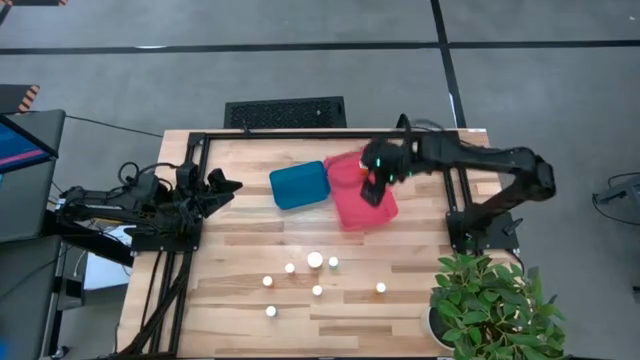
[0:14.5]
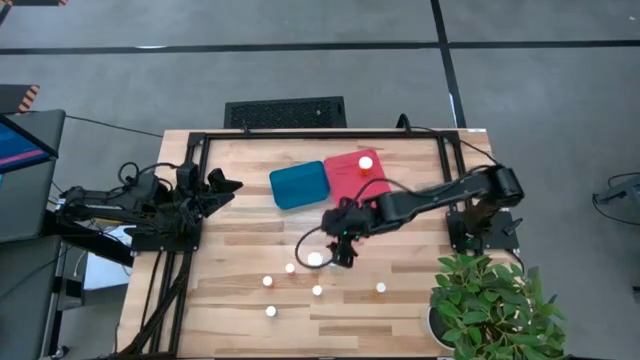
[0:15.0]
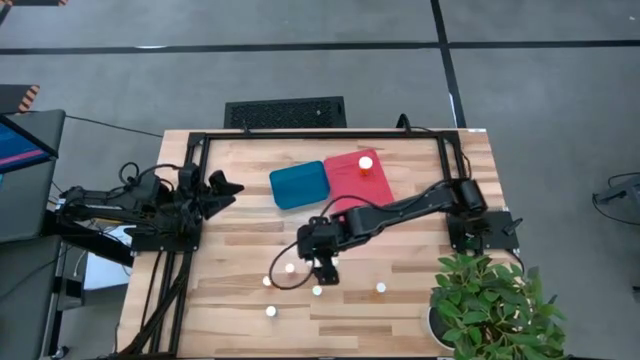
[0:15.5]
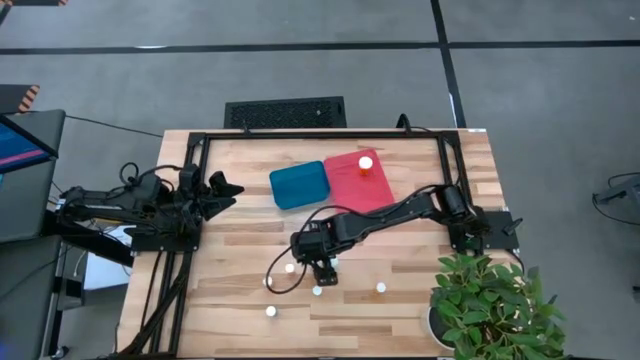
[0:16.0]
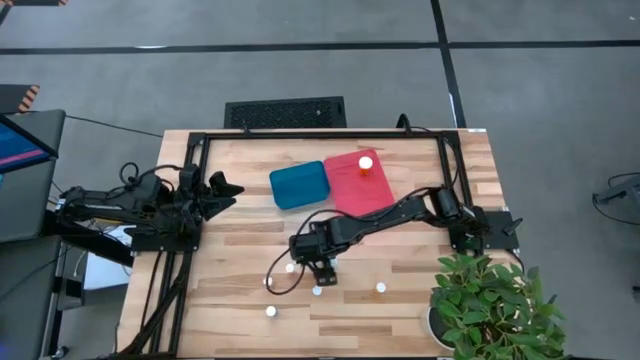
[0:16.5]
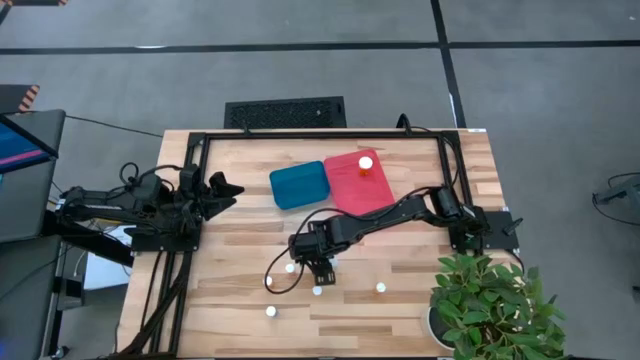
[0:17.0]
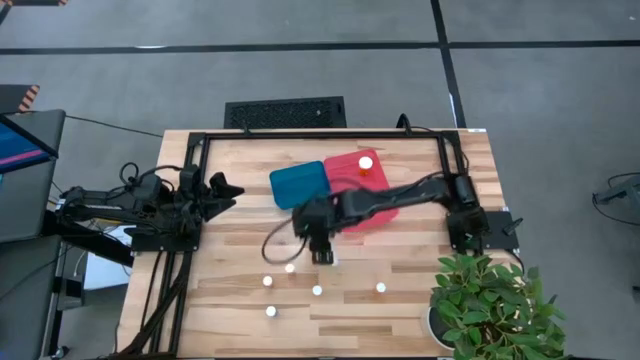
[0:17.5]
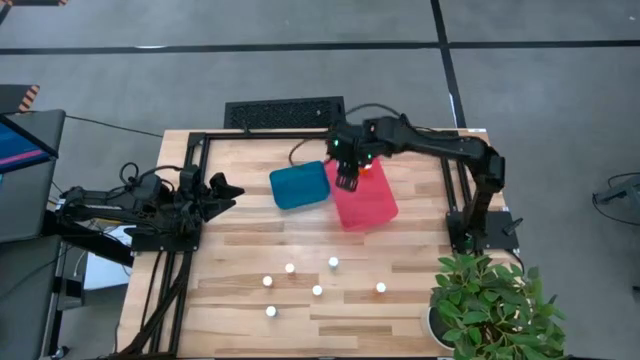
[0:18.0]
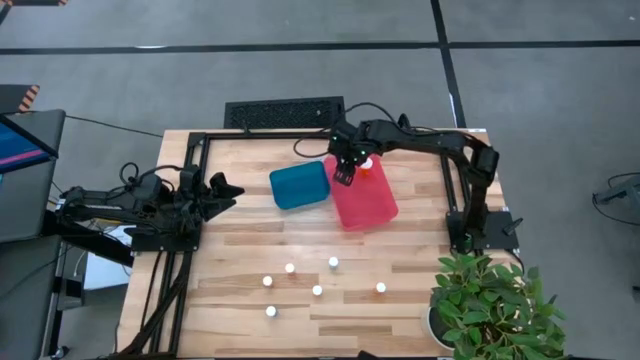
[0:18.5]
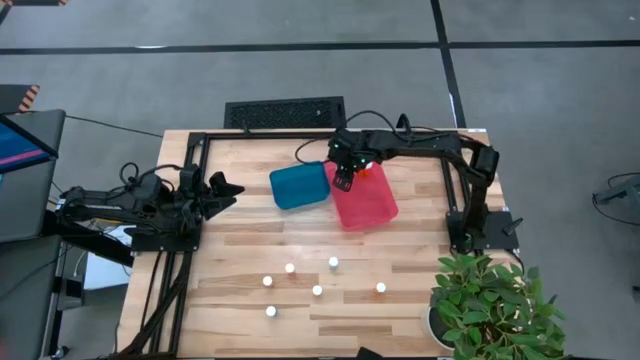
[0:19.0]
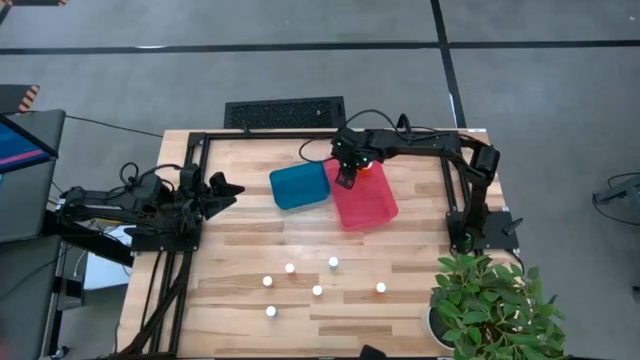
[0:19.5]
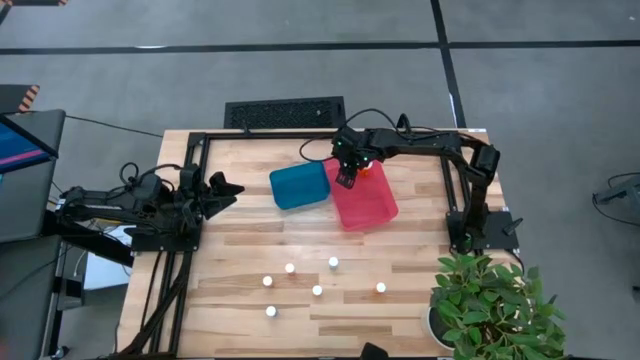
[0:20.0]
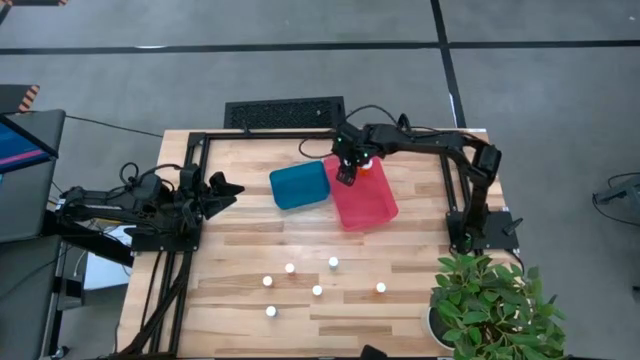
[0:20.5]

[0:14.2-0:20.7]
Task: Pick and place medicine bottles into bin by pill shape (circle, oval)
Put the large orange pill bottle into the red bin

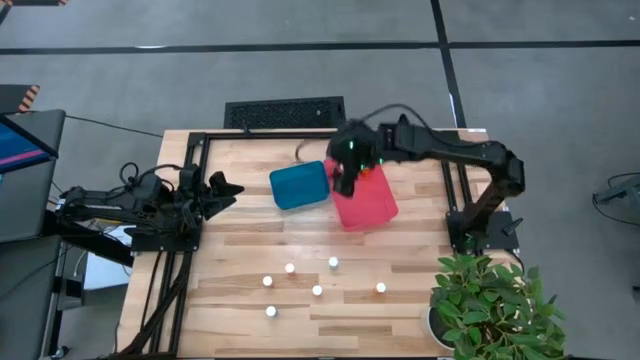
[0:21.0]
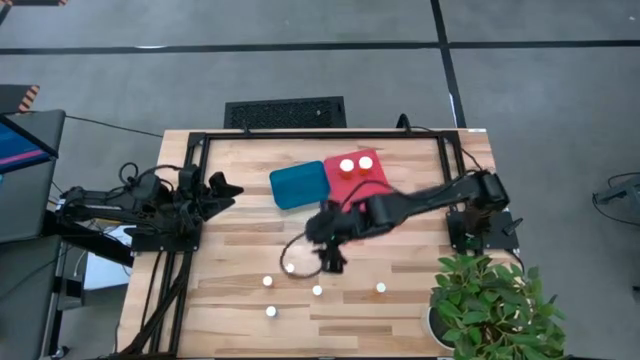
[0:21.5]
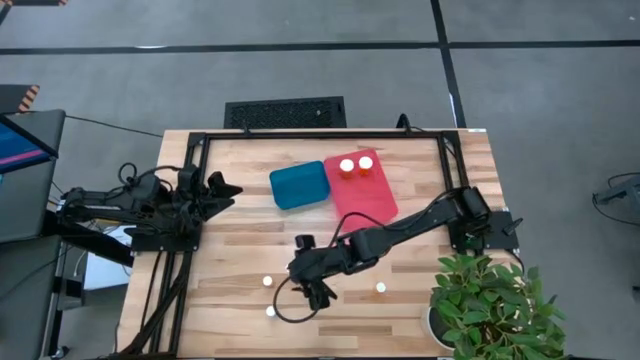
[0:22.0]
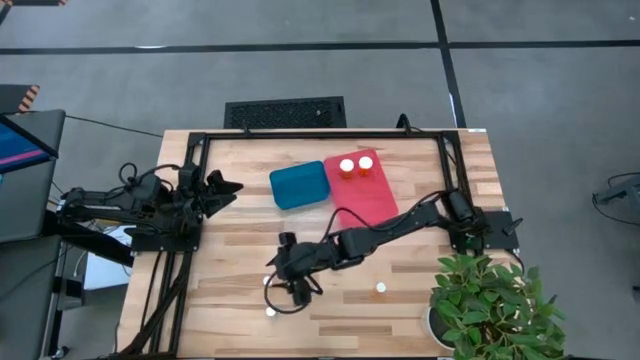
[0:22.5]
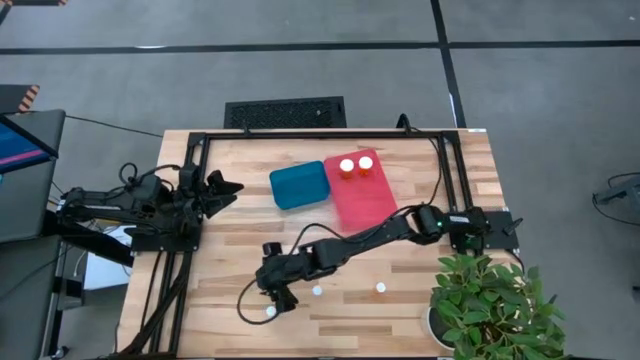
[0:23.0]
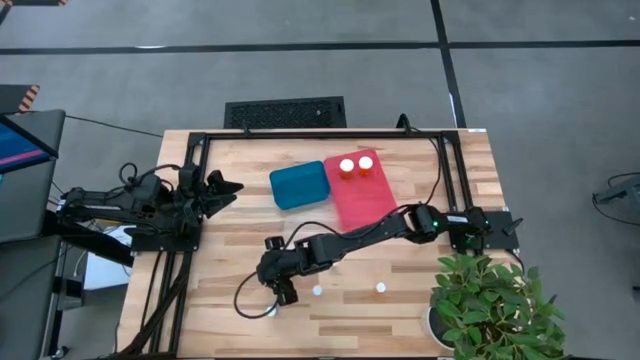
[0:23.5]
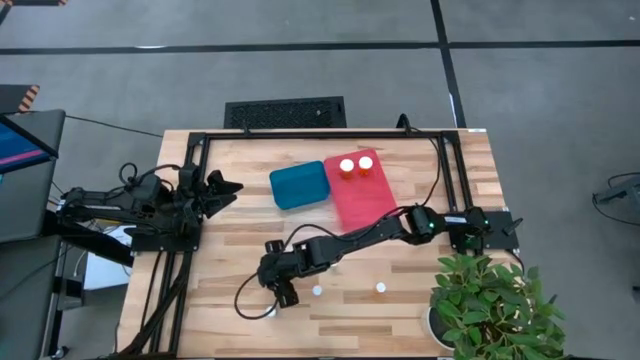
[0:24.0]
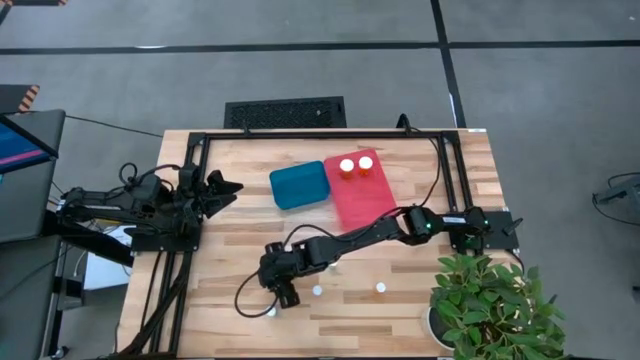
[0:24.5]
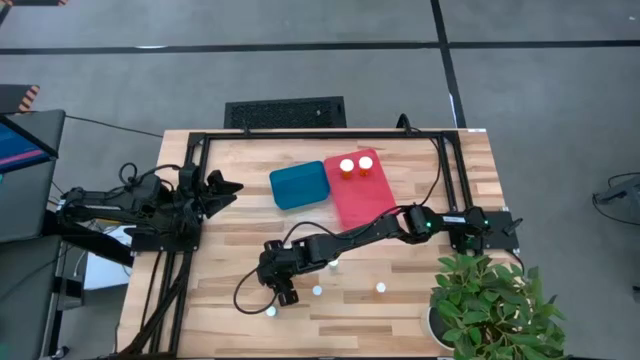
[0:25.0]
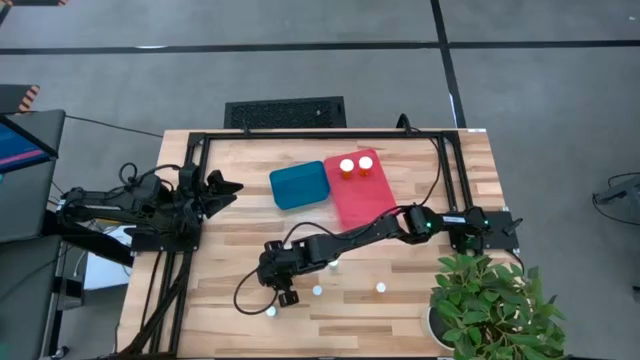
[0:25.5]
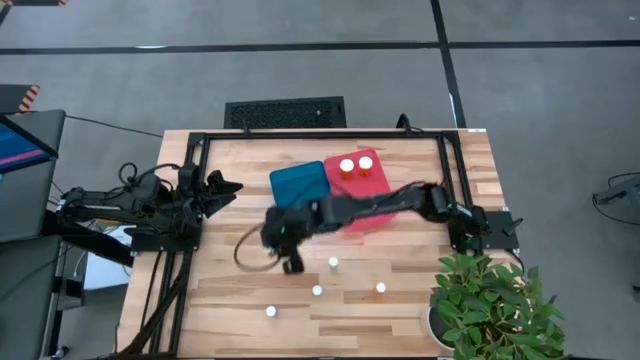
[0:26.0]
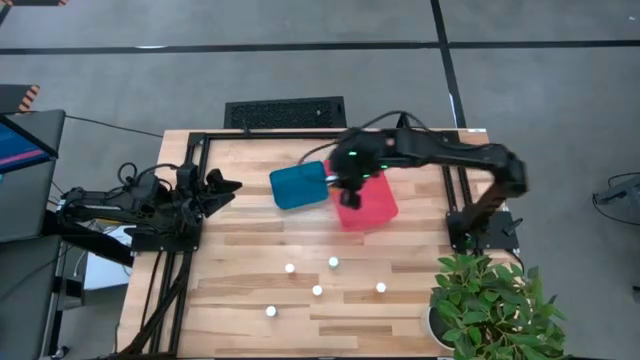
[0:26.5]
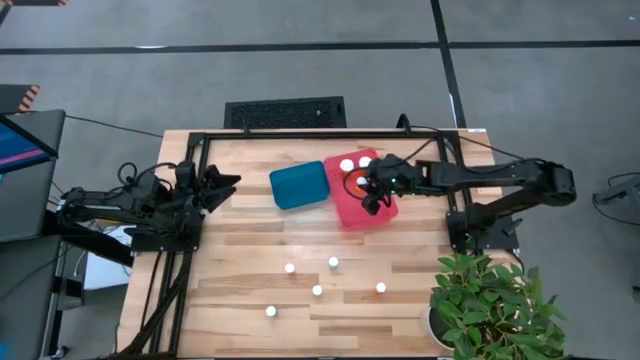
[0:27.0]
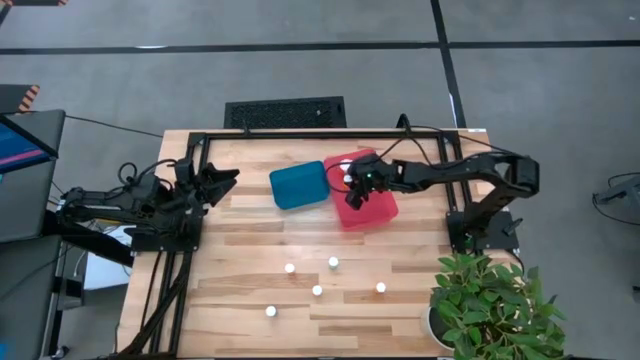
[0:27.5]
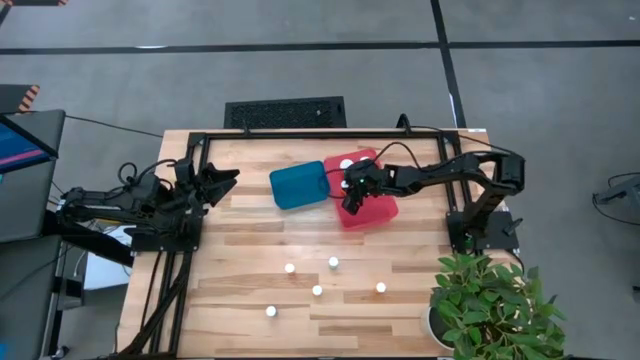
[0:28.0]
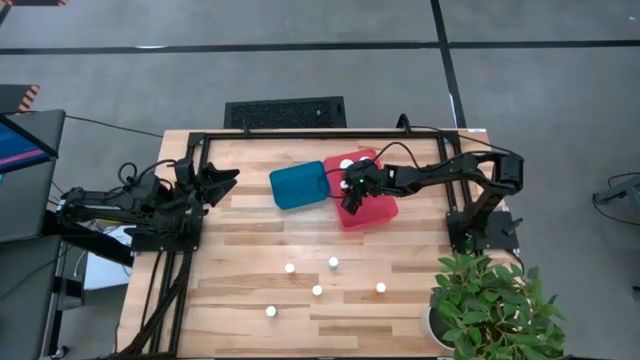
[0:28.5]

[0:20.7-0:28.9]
Put the left orange pill bottle into the red bin

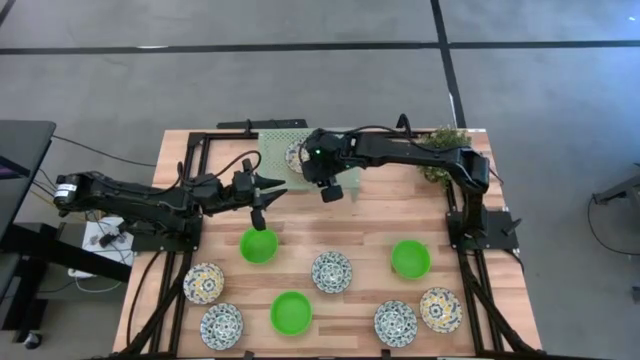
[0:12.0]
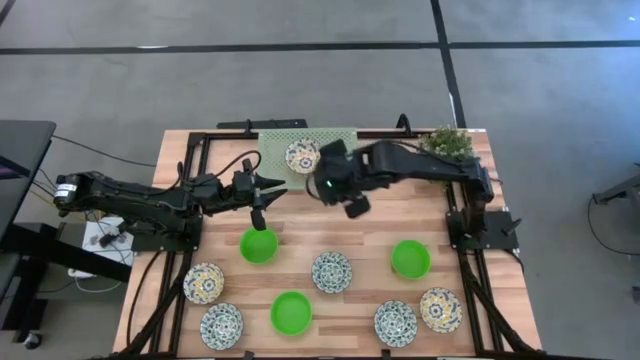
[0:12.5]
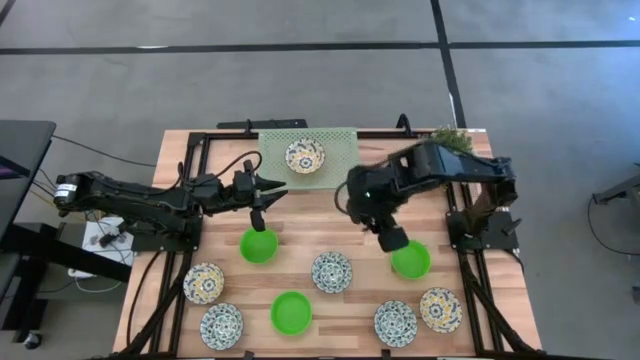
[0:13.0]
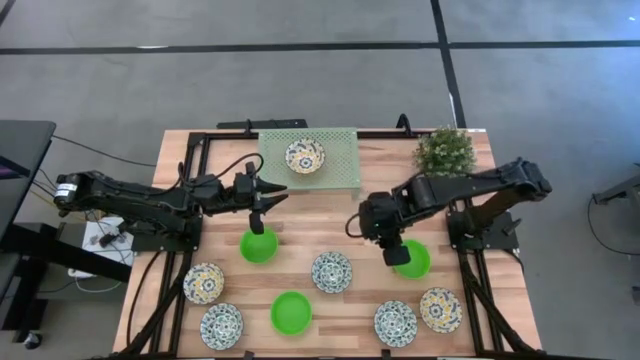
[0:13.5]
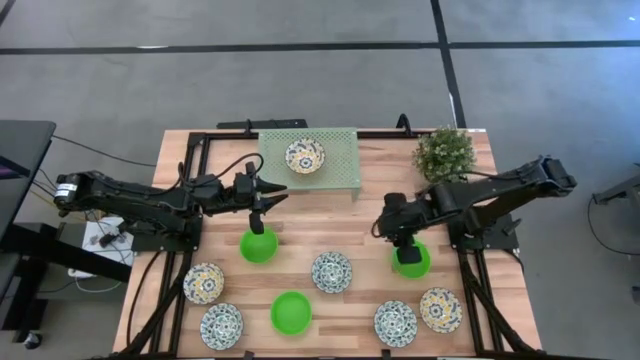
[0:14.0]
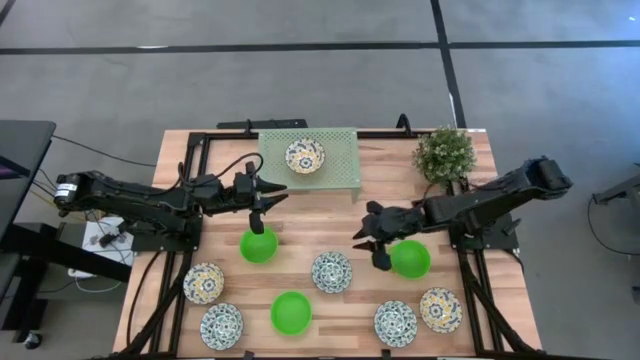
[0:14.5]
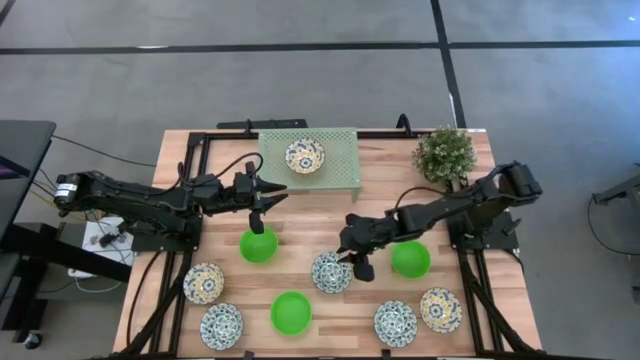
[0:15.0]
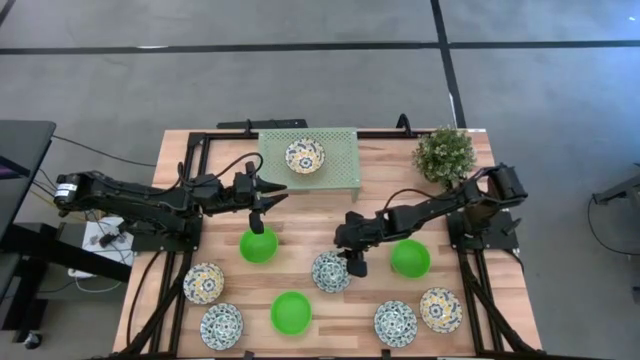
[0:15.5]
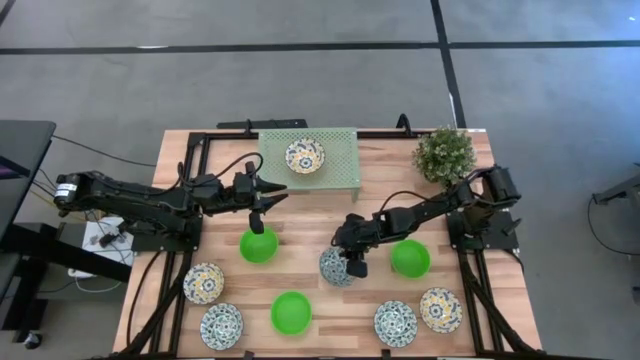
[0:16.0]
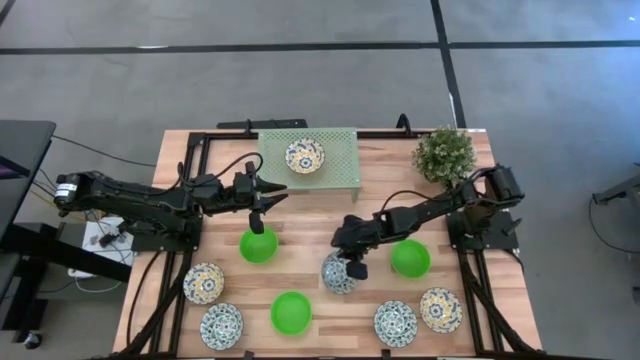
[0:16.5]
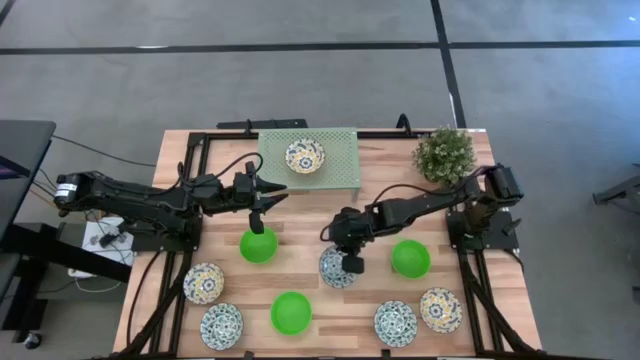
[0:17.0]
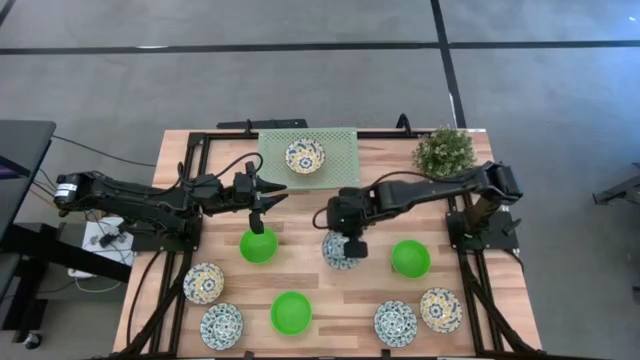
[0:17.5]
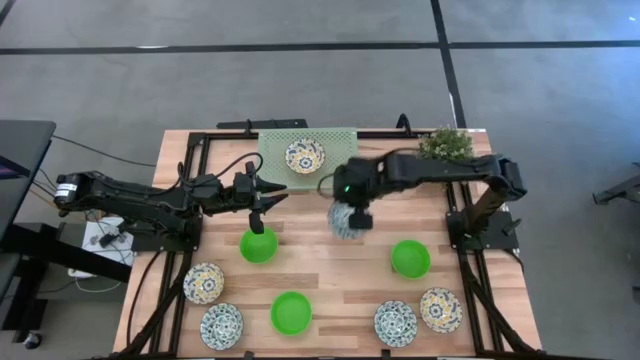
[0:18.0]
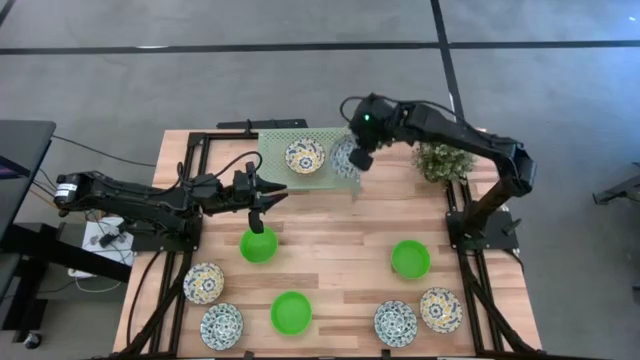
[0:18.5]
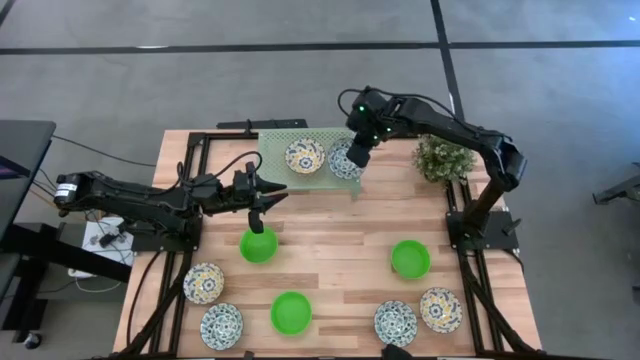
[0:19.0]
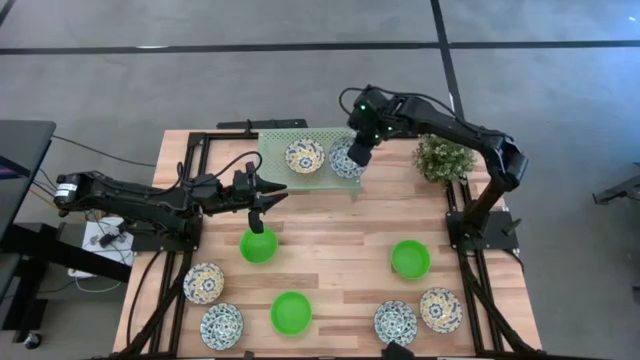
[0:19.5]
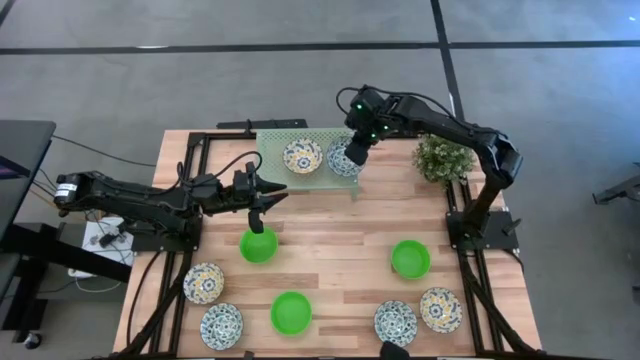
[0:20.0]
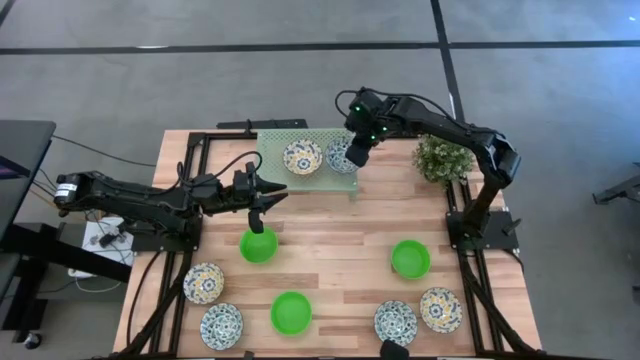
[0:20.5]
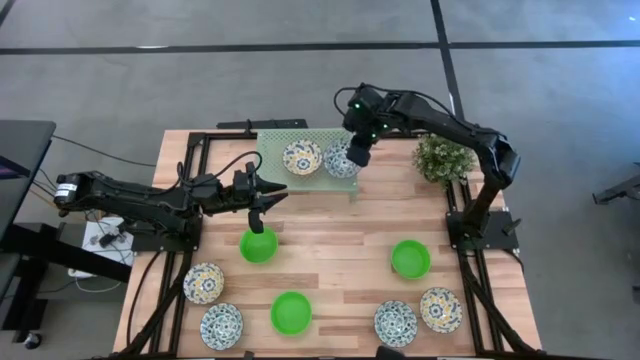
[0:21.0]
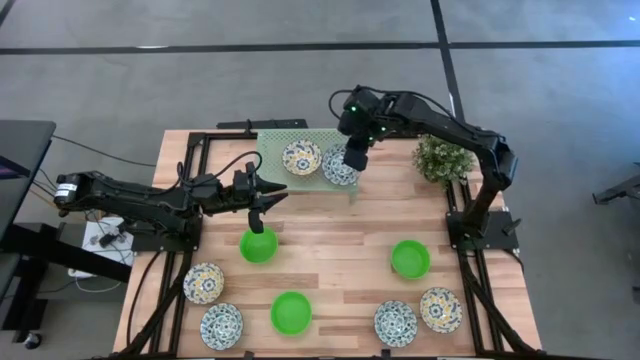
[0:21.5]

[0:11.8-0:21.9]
Task: Pick & Place Mini bowls
Put the top blue patterned bowl on the shelf
